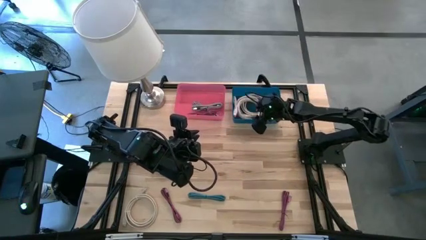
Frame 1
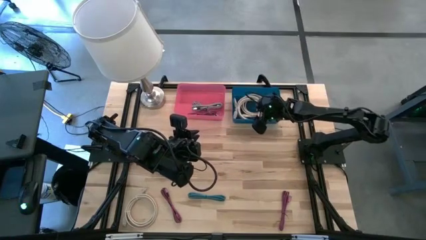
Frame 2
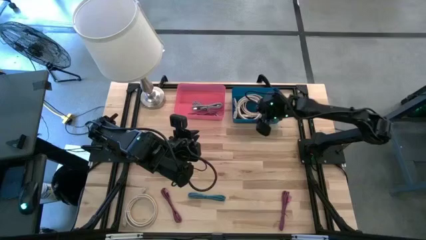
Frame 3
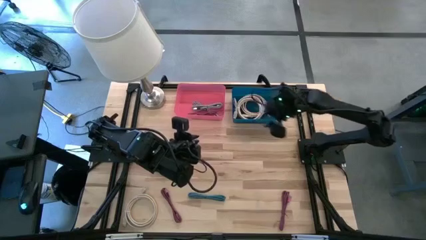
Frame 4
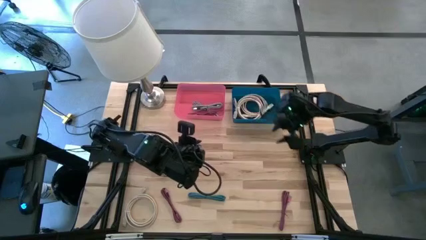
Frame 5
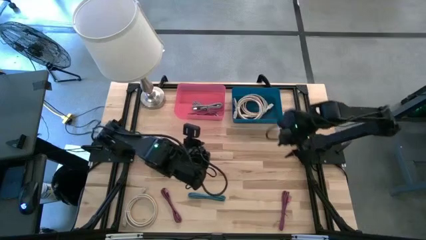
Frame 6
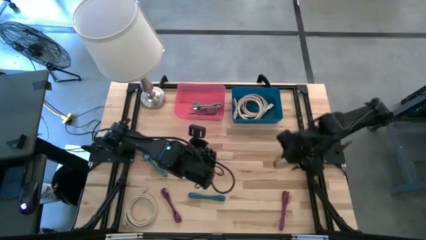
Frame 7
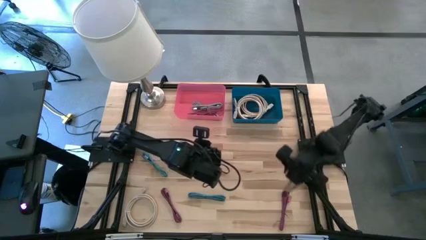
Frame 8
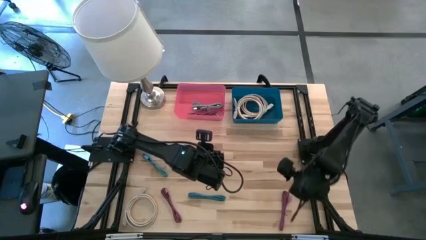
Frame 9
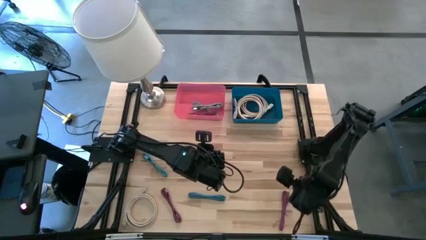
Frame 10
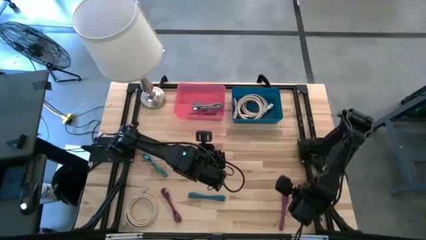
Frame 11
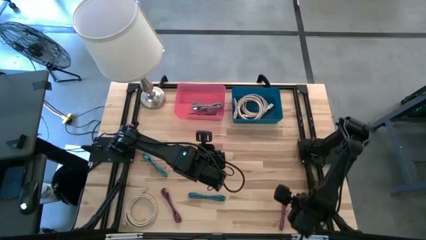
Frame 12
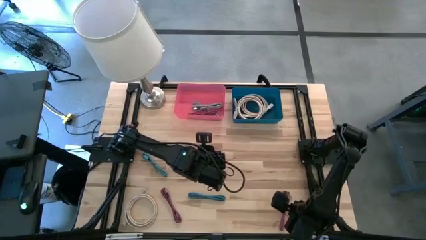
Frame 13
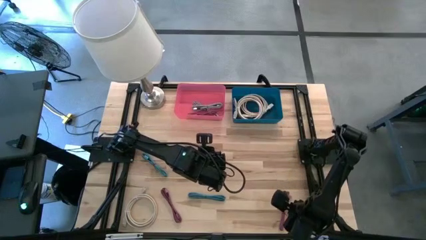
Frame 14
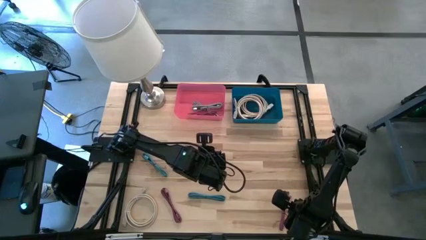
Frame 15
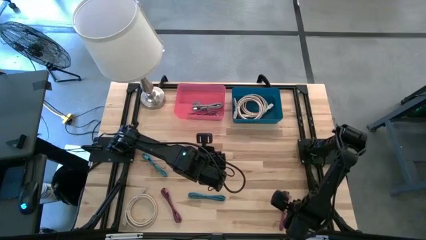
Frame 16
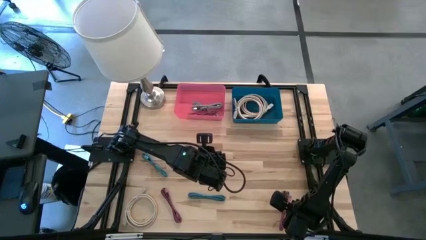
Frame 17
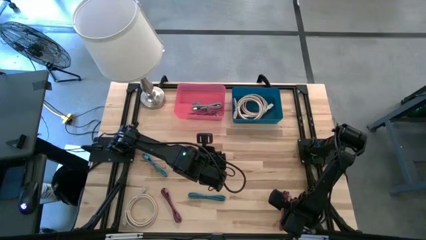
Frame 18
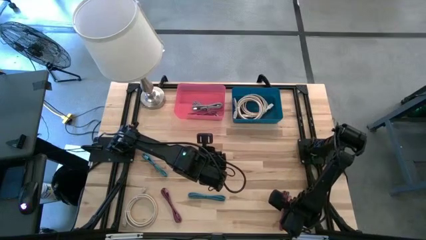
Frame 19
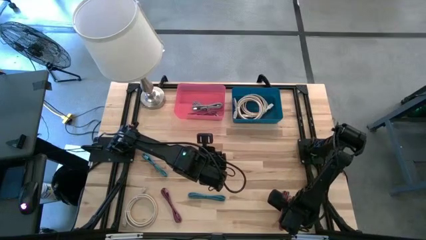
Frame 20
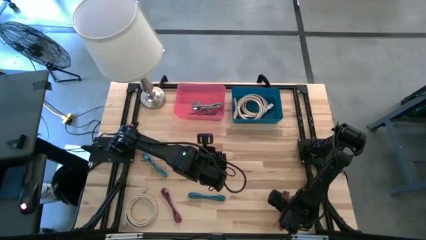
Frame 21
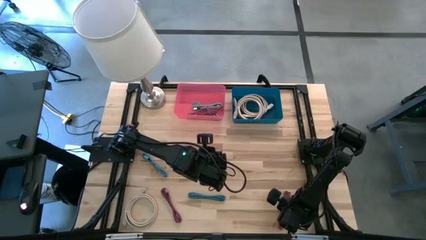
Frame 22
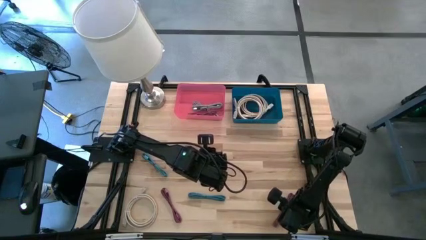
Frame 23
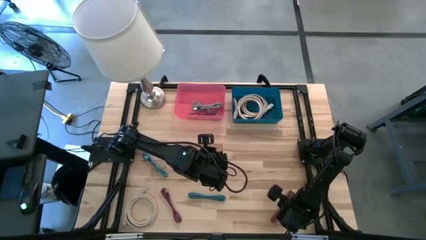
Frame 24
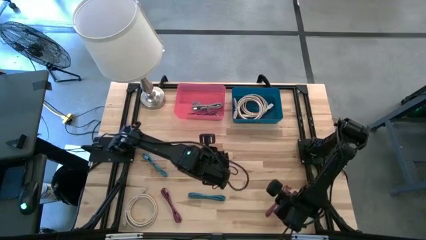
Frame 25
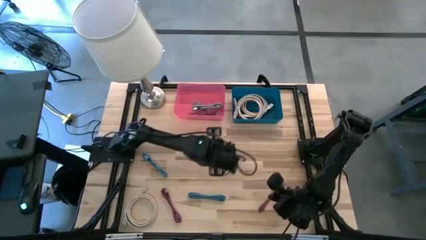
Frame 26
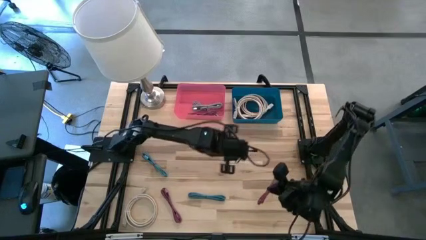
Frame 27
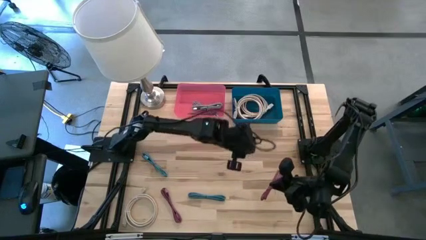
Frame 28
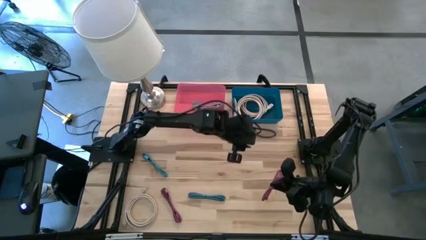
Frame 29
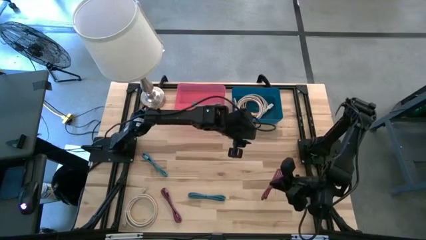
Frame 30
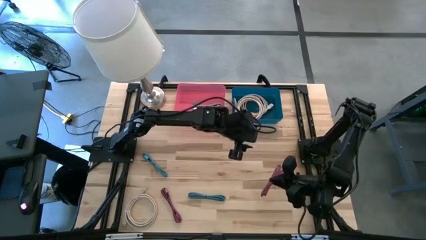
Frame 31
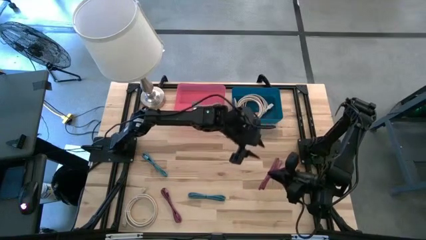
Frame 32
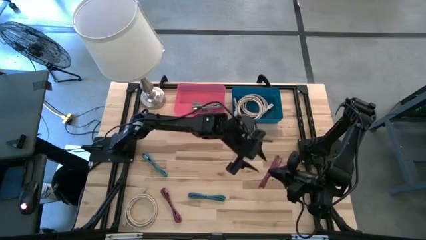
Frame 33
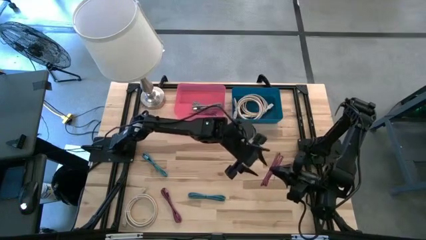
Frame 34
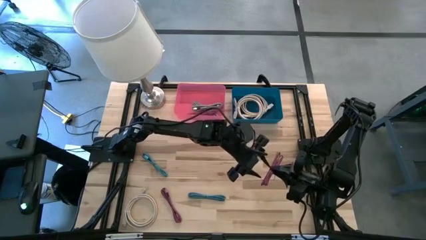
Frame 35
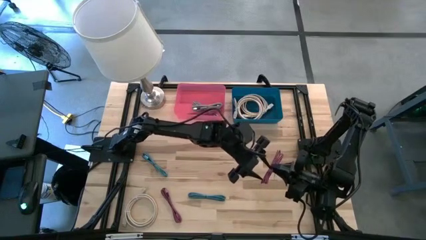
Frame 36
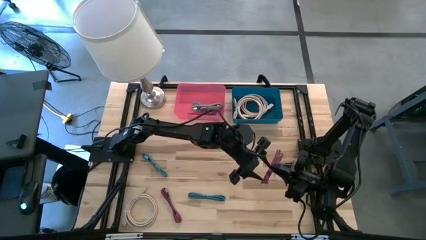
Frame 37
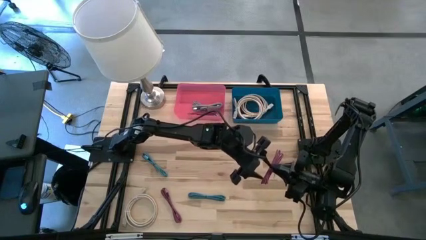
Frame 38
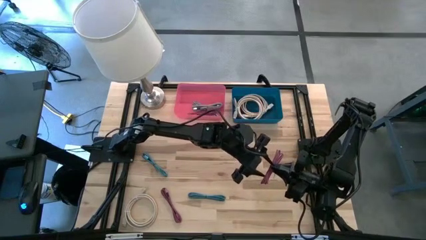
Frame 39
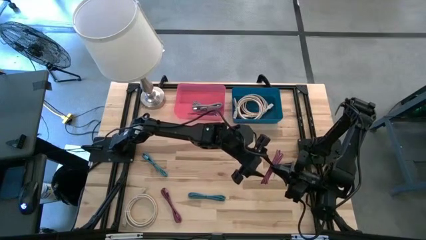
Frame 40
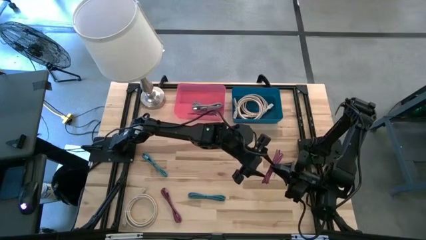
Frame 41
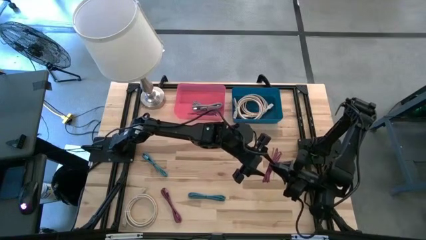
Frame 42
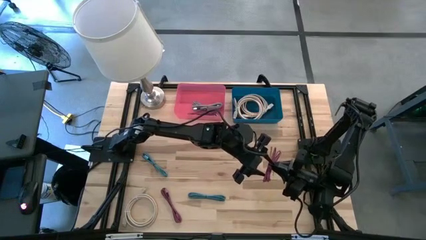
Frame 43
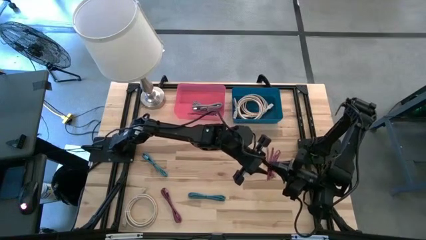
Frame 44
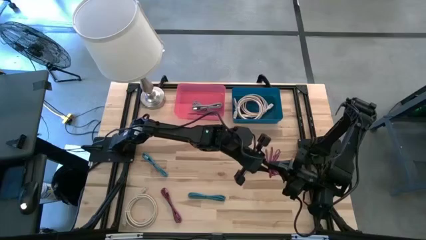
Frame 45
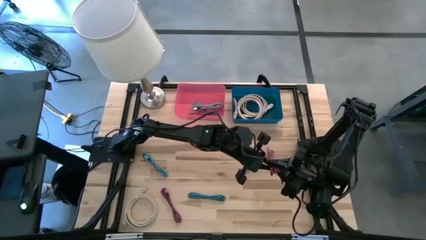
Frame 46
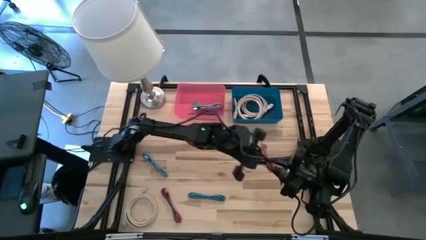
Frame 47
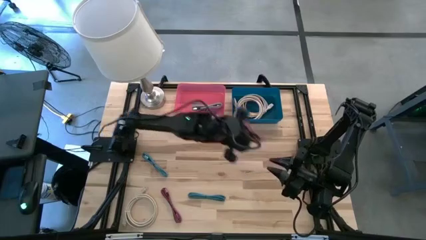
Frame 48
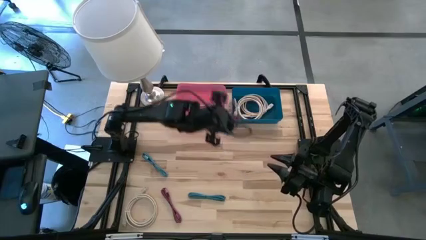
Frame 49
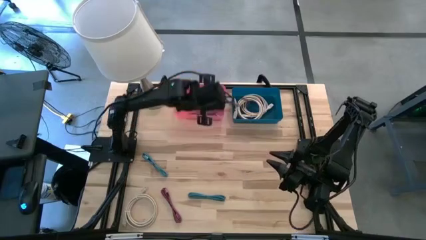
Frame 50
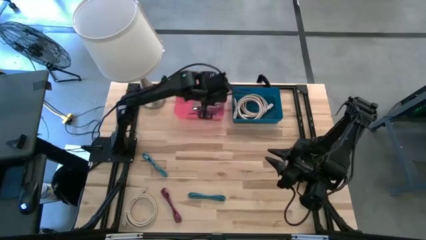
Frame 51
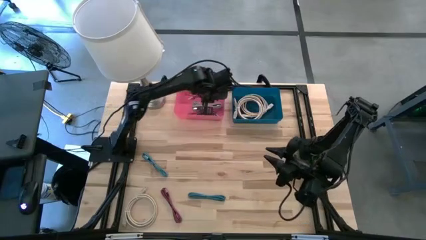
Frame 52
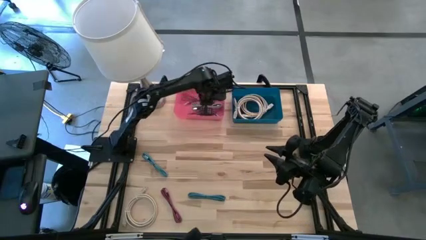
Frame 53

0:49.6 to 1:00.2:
Task: Pick & Place USB Port
Put the right black and pink charger cable into the red bin
